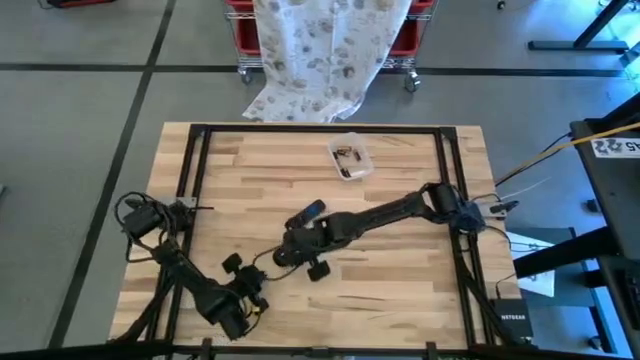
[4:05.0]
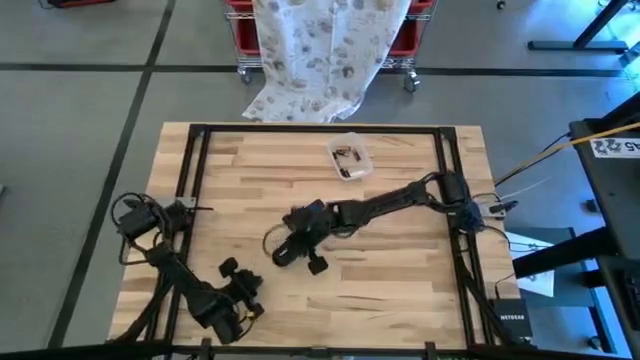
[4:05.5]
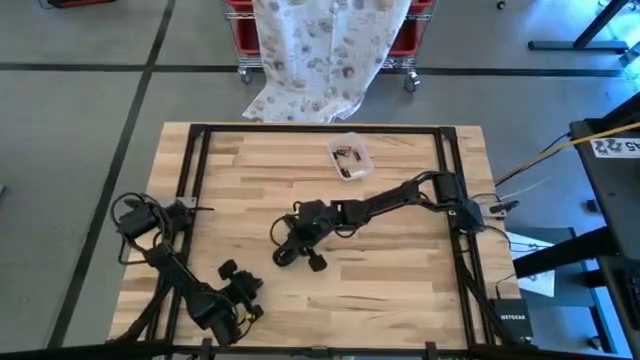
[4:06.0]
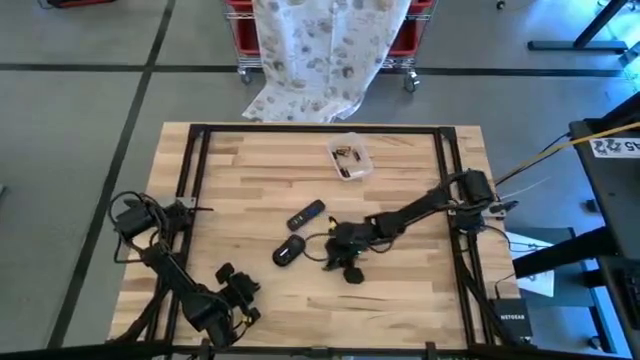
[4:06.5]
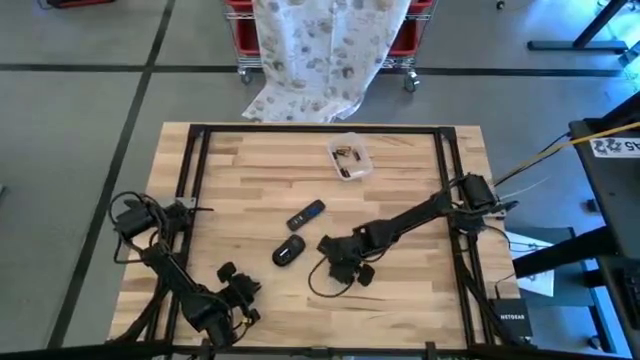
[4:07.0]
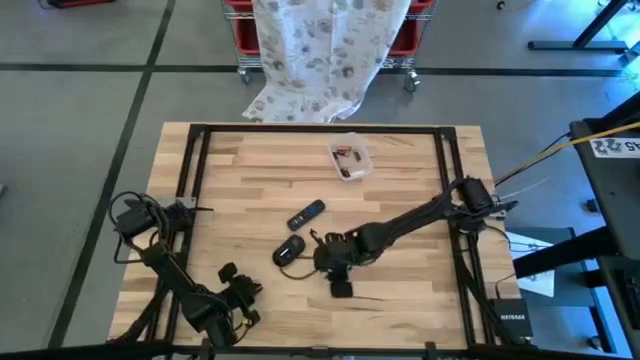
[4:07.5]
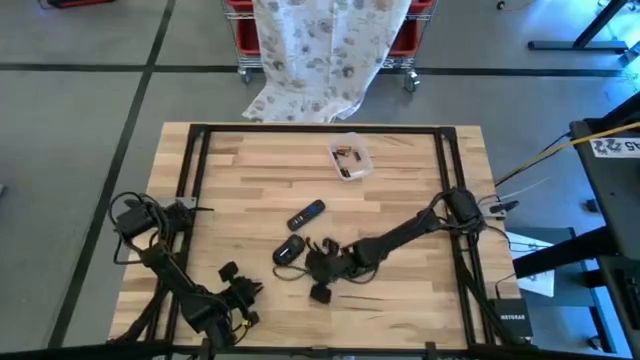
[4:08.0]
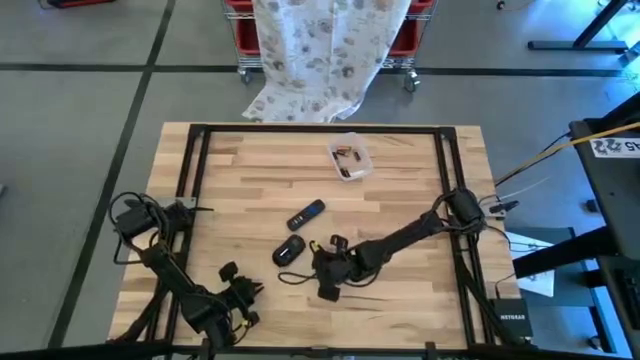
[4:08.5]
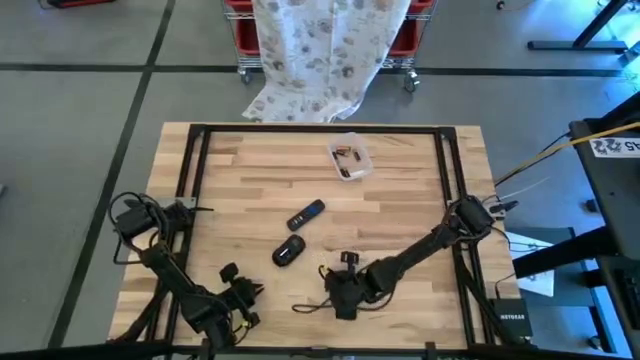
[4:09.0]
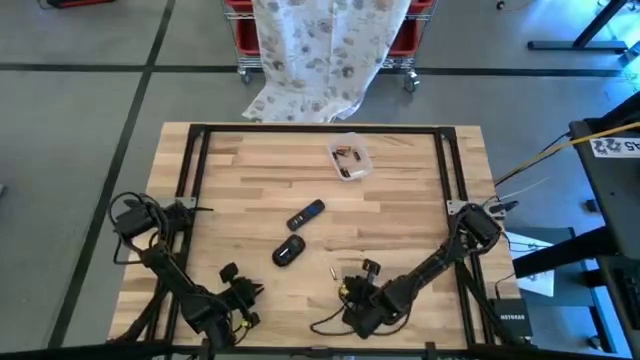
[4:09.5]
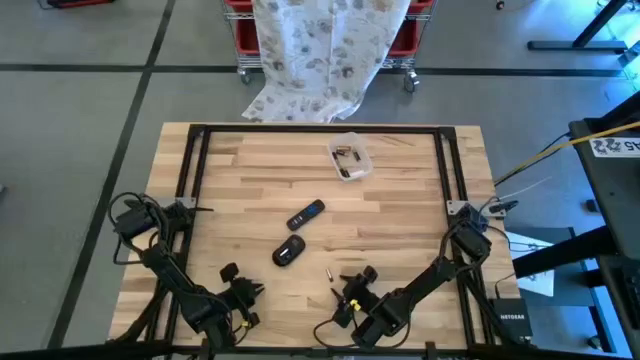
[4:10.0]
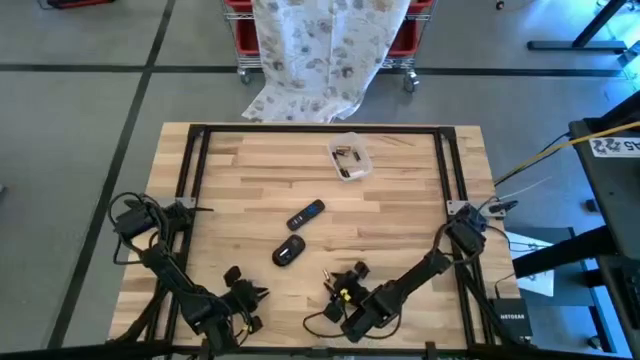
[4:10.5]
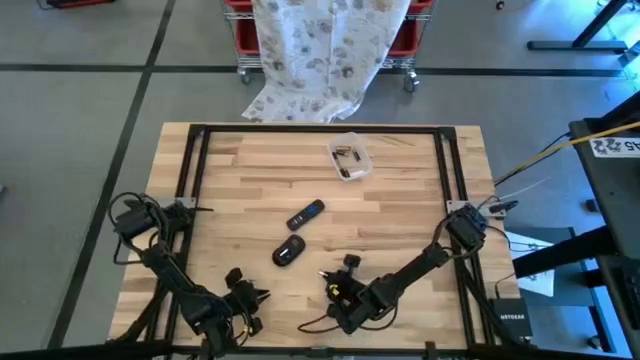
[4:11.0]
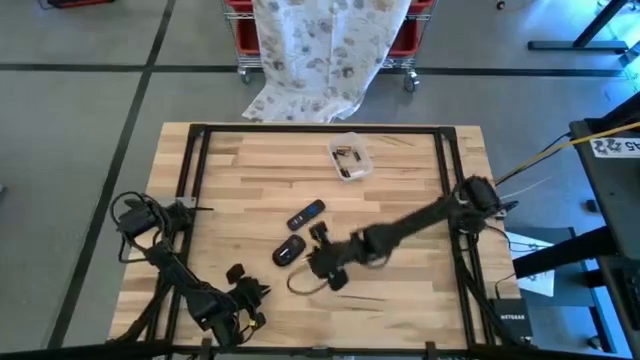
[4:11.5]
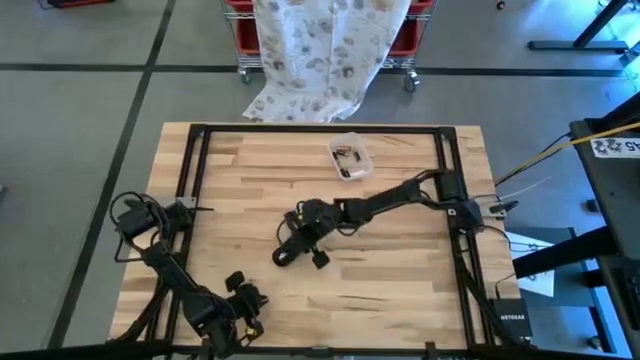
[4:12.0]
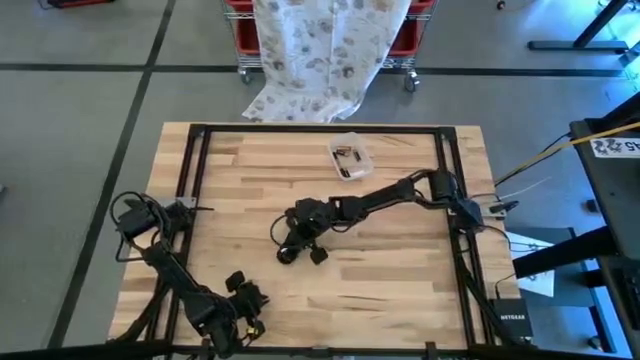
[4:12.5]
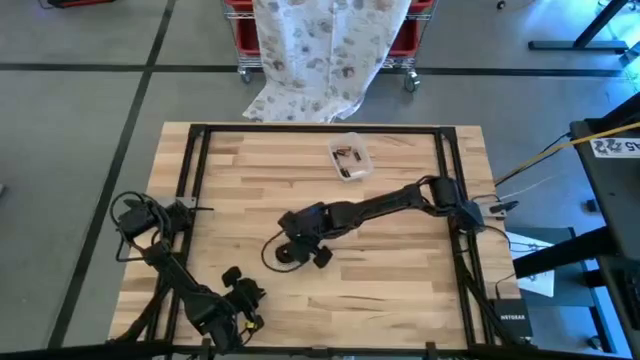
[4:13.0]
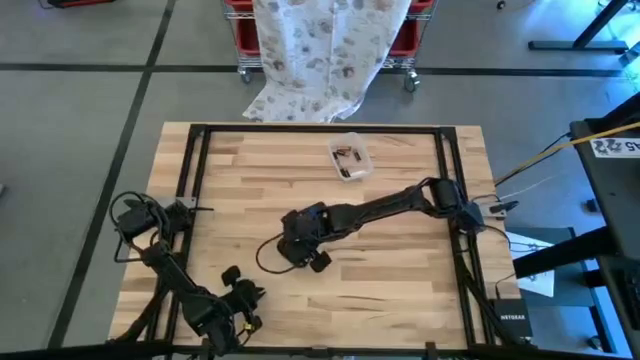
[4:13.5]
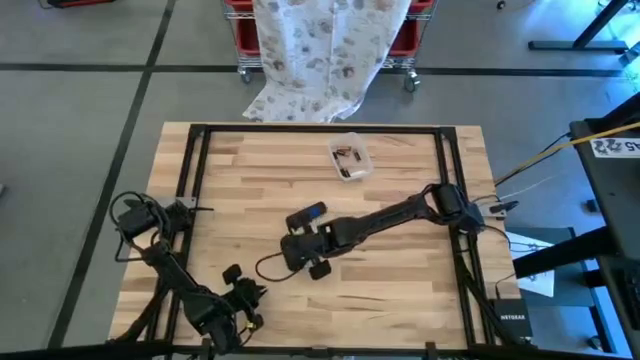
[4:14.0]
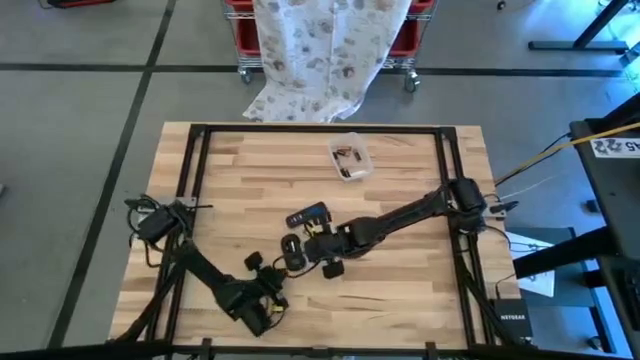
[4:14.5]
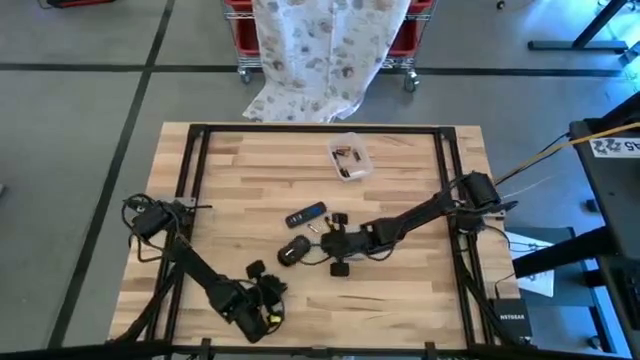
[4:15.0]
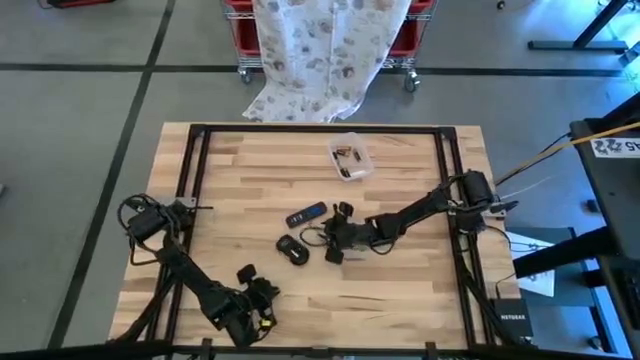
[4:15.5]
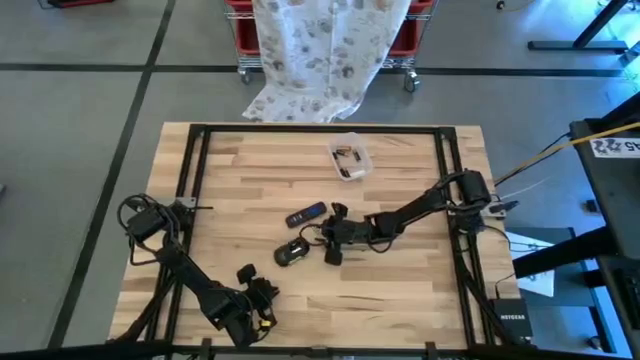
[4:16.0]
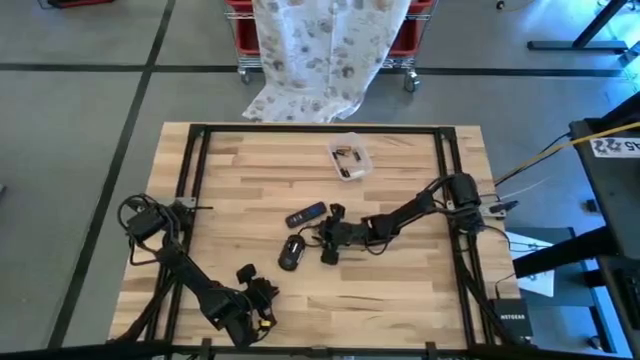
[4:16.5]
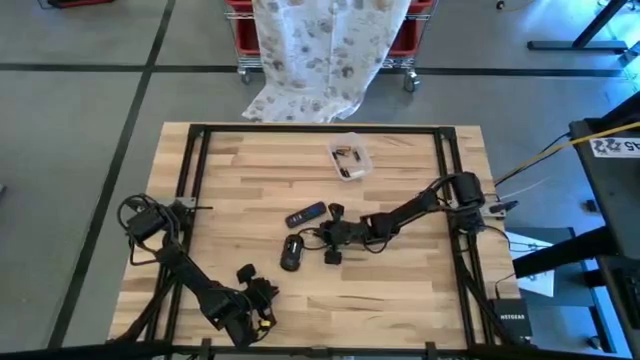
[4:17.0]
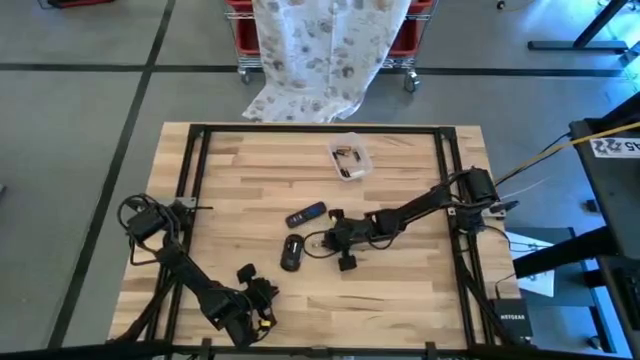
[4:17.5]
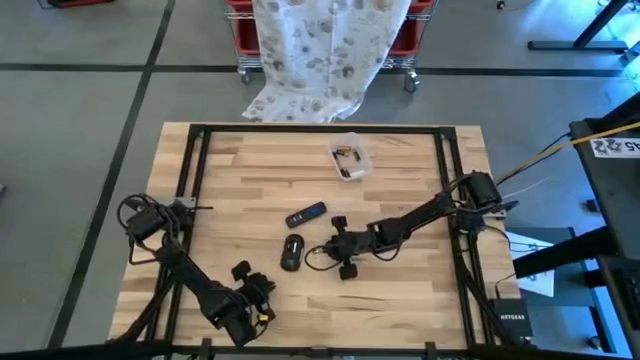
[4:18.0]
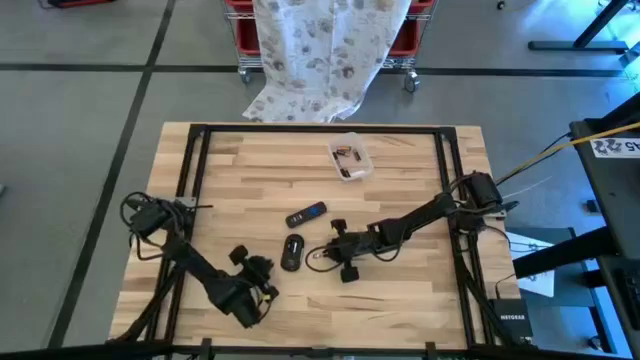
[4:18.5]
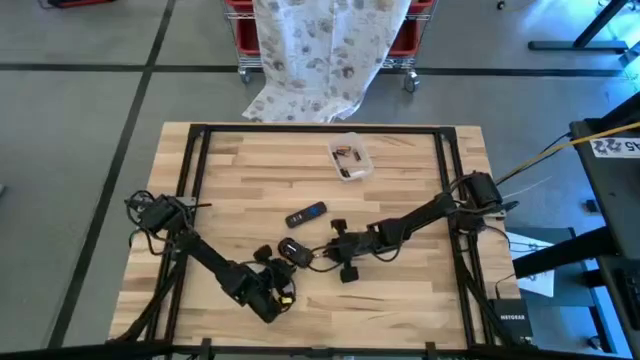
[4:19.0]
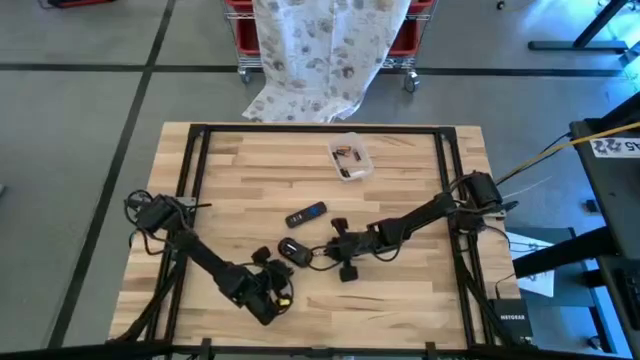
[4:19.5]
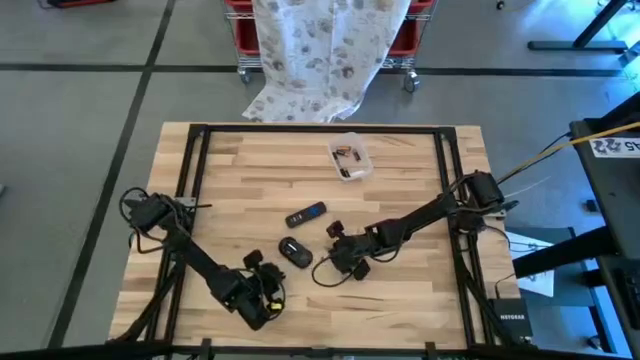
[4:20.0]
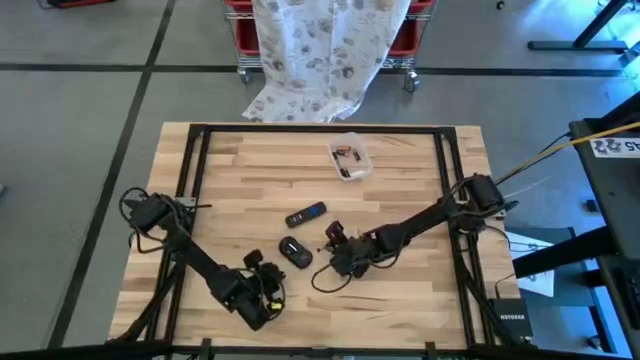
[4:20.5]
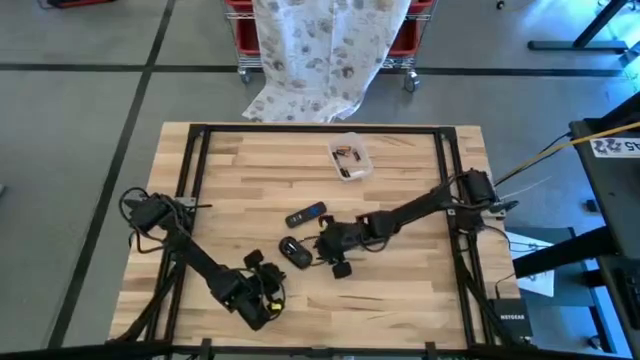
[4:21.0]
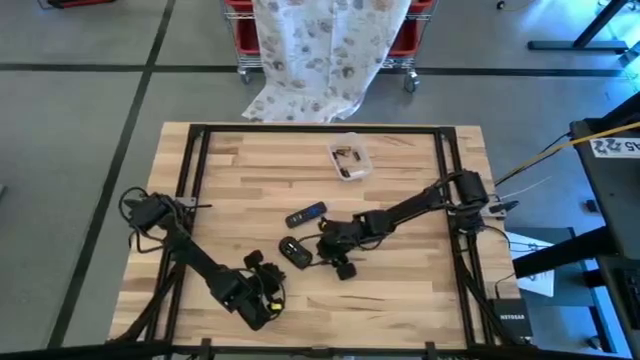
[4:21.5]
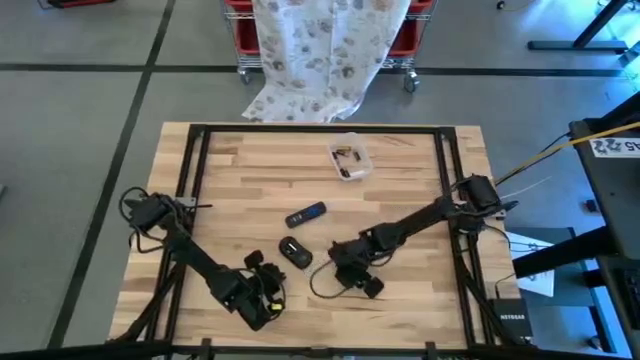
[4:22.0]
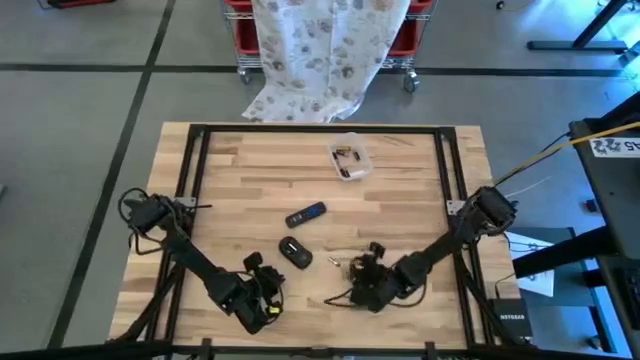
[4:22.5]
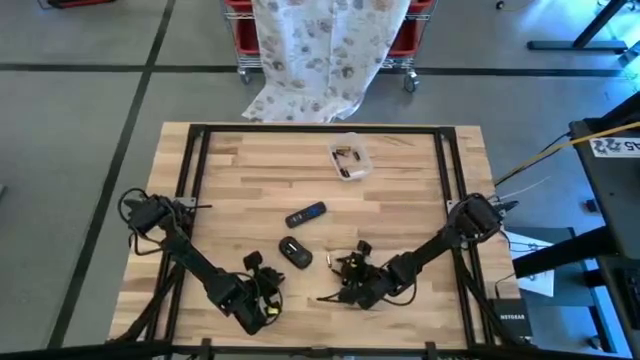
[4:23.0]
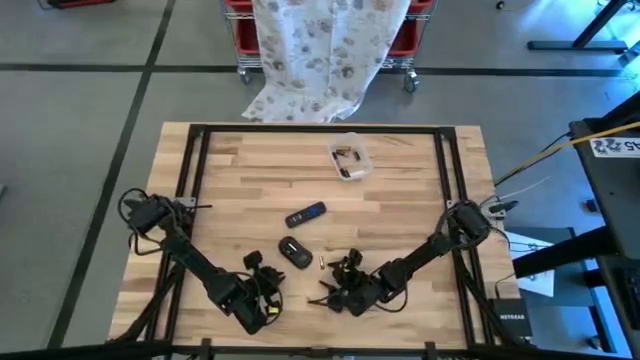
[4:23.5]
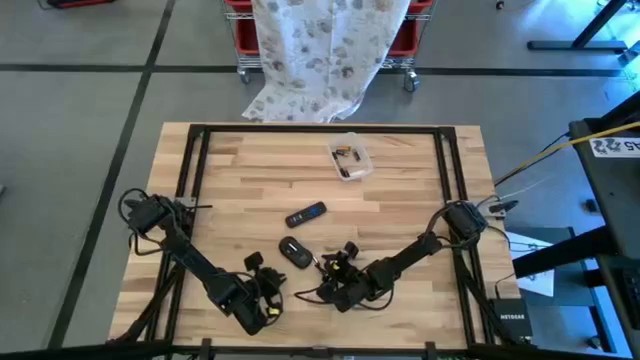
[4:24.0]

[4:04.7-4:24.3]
Task: Insert battery
Insert the white battery into the wireless mouse
